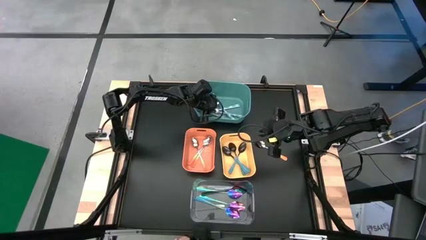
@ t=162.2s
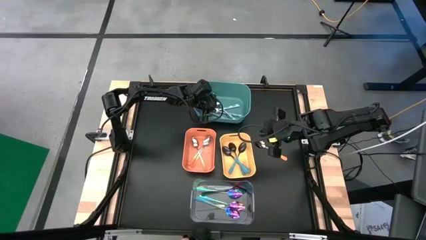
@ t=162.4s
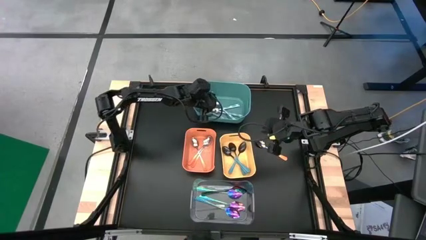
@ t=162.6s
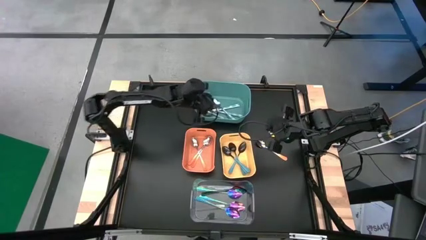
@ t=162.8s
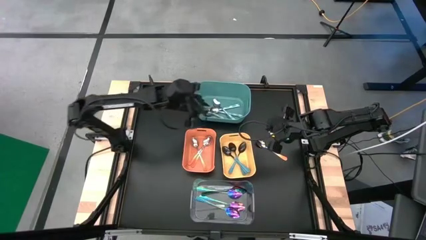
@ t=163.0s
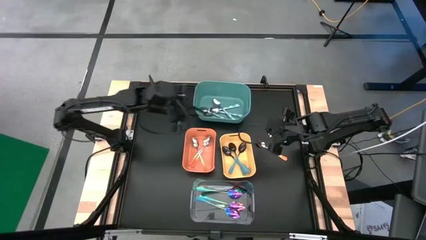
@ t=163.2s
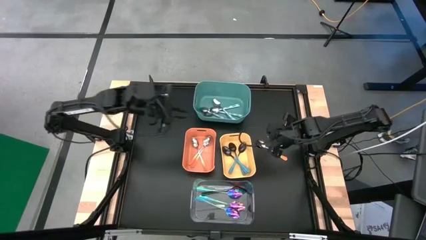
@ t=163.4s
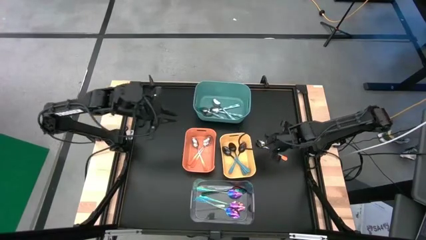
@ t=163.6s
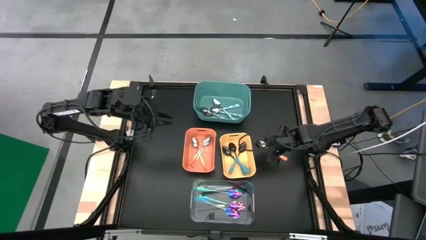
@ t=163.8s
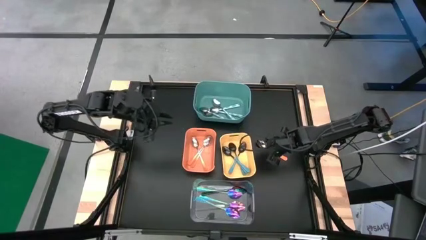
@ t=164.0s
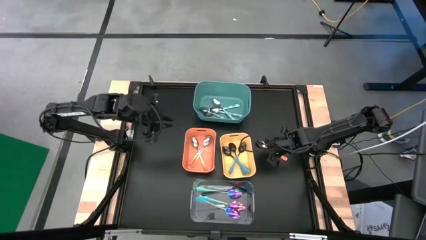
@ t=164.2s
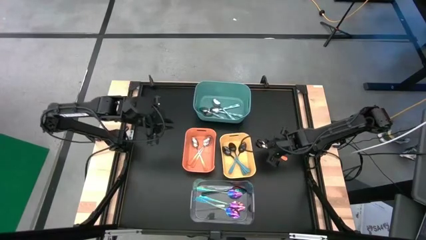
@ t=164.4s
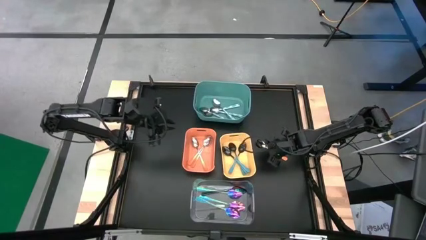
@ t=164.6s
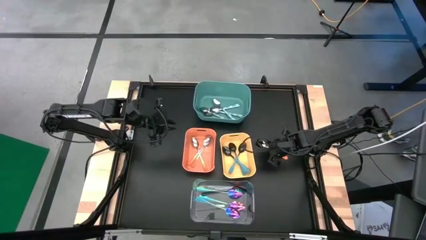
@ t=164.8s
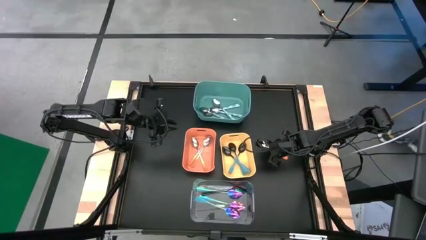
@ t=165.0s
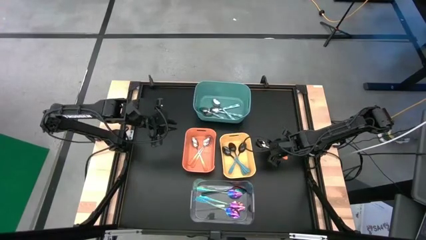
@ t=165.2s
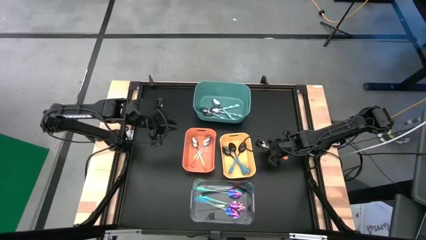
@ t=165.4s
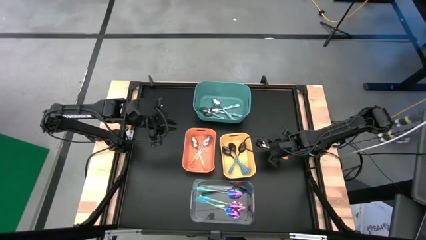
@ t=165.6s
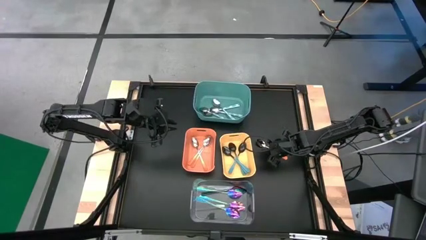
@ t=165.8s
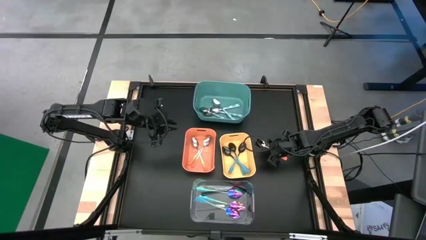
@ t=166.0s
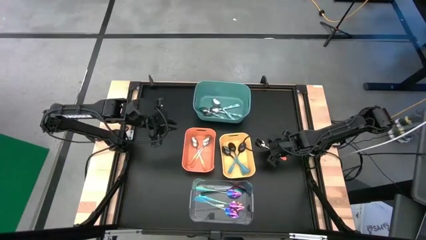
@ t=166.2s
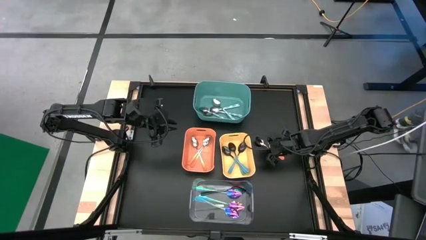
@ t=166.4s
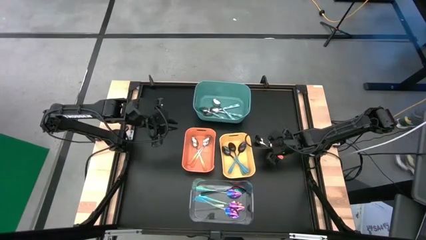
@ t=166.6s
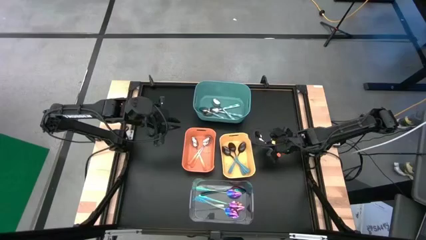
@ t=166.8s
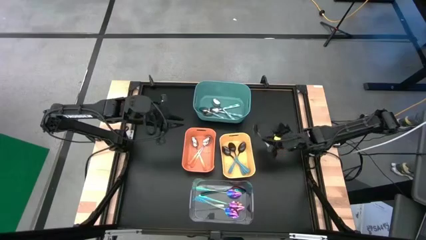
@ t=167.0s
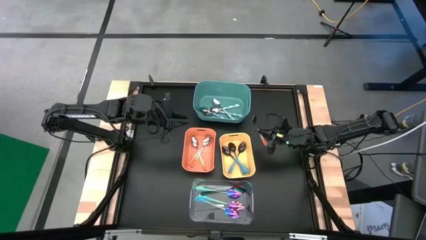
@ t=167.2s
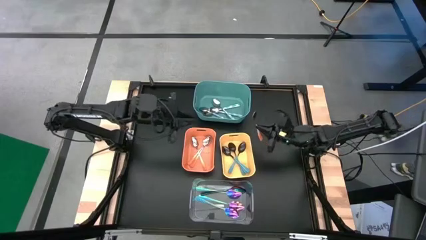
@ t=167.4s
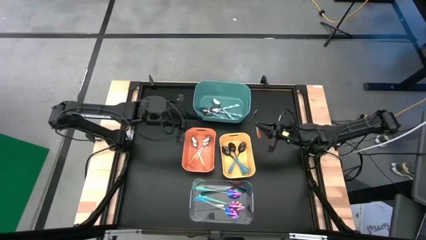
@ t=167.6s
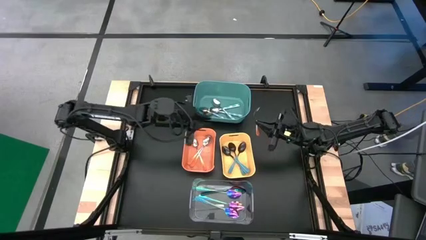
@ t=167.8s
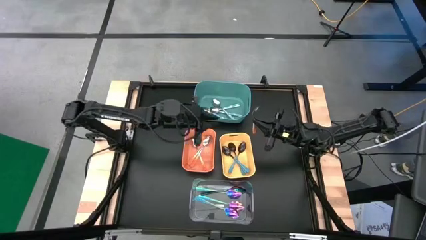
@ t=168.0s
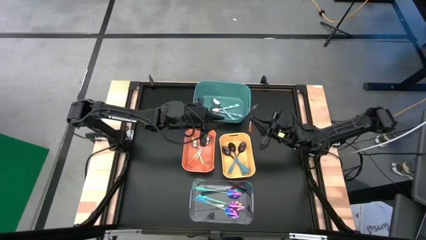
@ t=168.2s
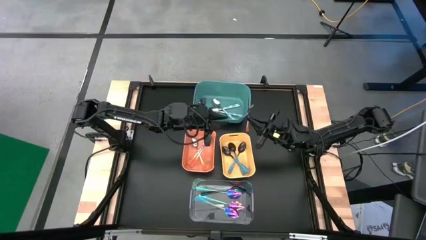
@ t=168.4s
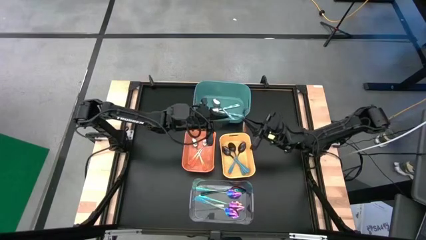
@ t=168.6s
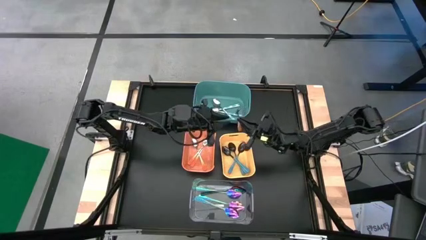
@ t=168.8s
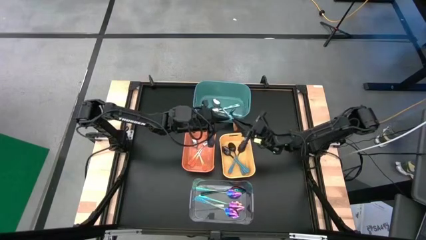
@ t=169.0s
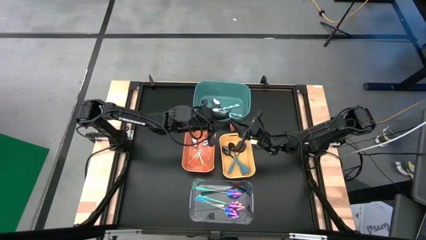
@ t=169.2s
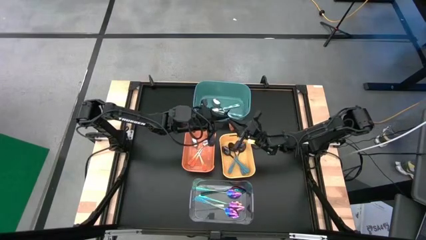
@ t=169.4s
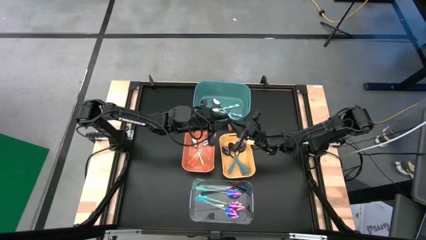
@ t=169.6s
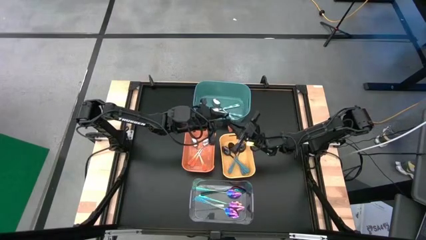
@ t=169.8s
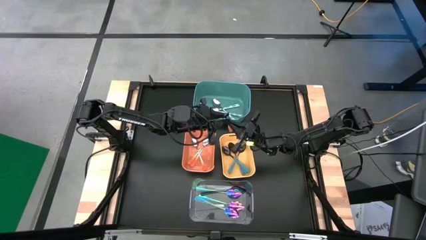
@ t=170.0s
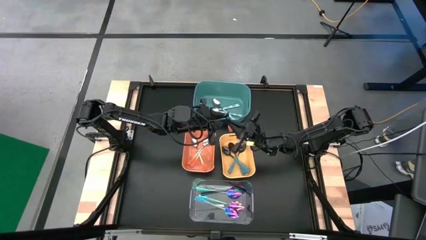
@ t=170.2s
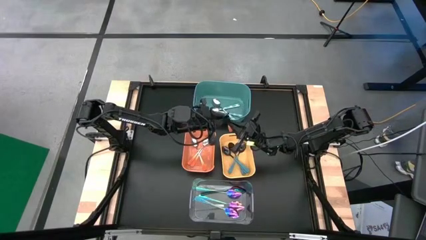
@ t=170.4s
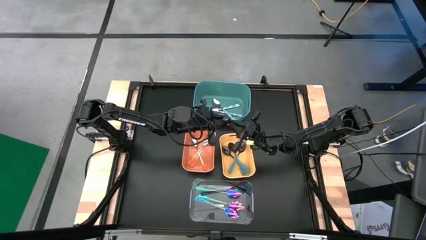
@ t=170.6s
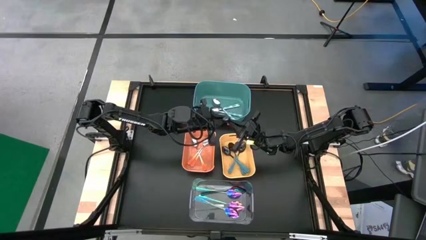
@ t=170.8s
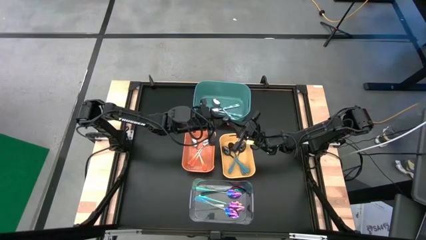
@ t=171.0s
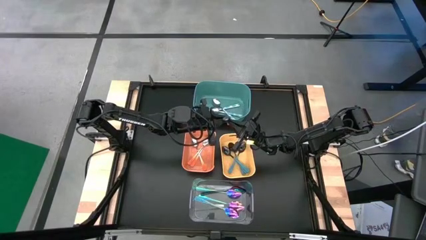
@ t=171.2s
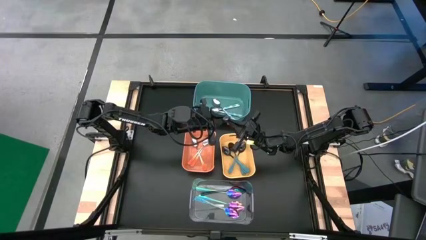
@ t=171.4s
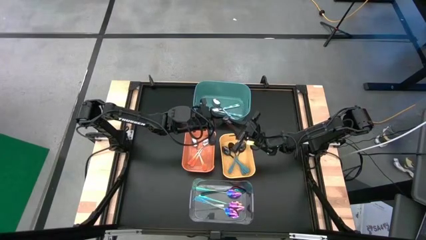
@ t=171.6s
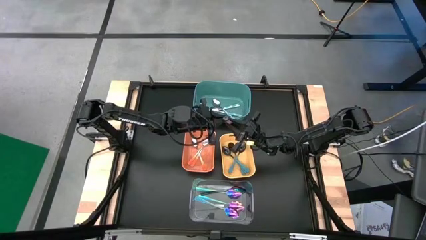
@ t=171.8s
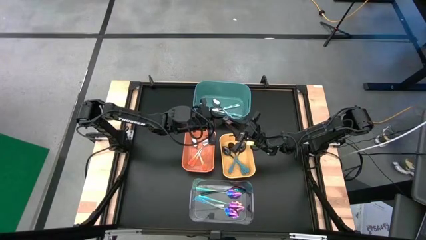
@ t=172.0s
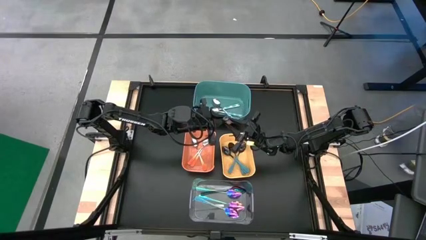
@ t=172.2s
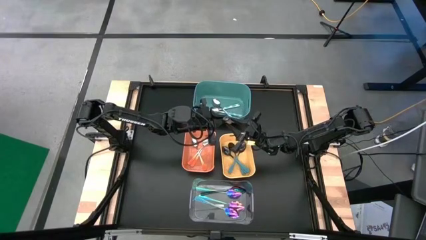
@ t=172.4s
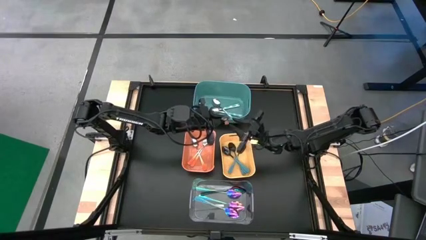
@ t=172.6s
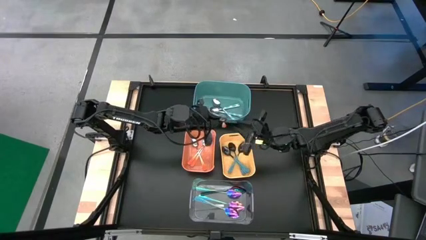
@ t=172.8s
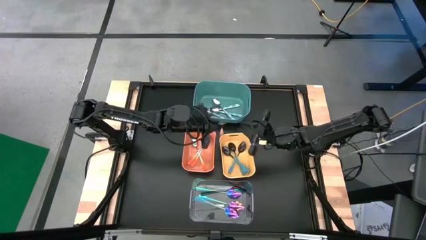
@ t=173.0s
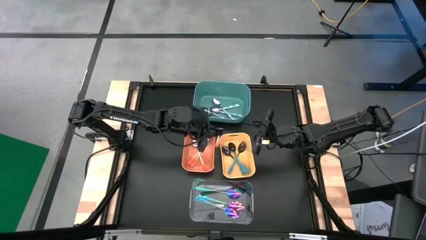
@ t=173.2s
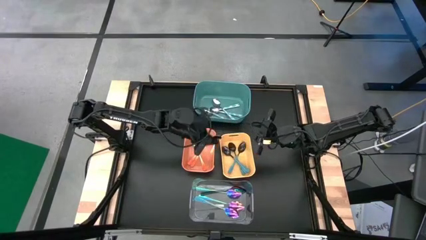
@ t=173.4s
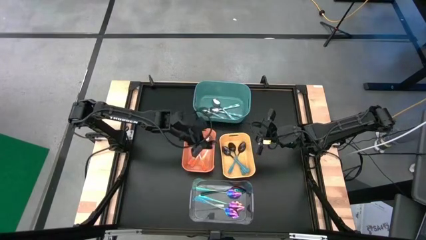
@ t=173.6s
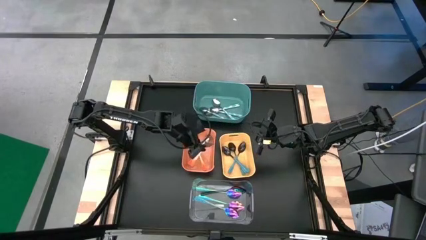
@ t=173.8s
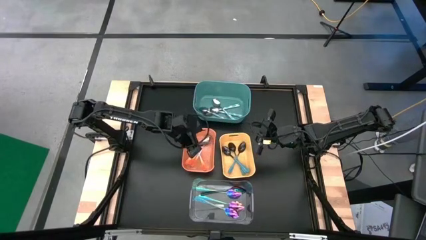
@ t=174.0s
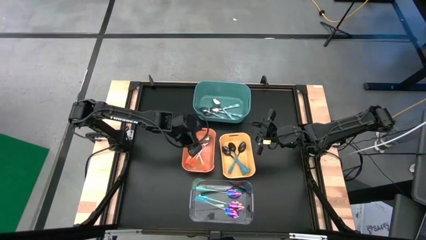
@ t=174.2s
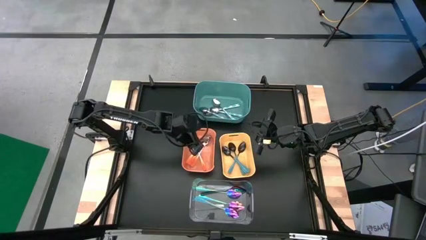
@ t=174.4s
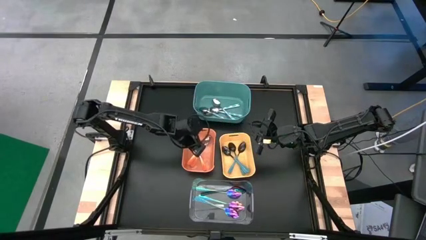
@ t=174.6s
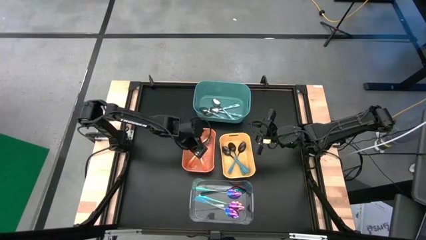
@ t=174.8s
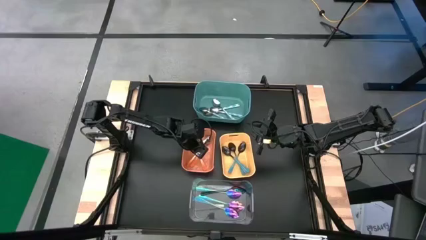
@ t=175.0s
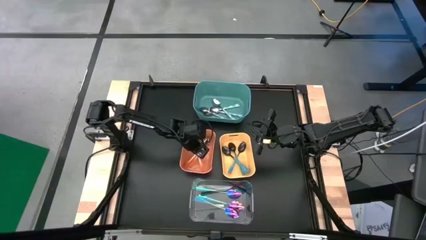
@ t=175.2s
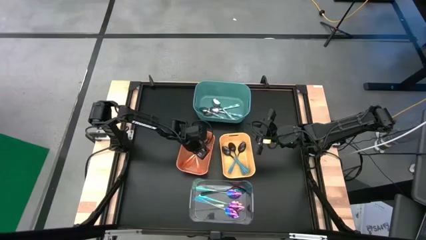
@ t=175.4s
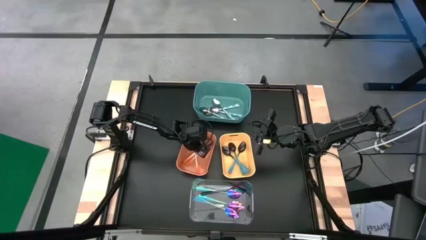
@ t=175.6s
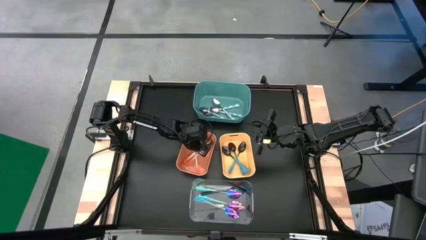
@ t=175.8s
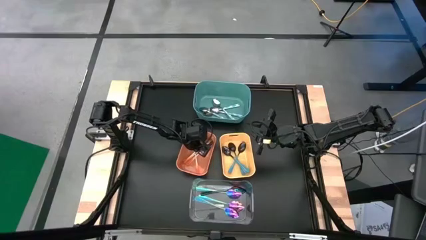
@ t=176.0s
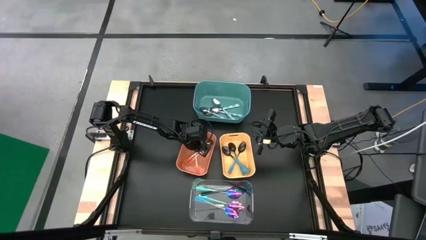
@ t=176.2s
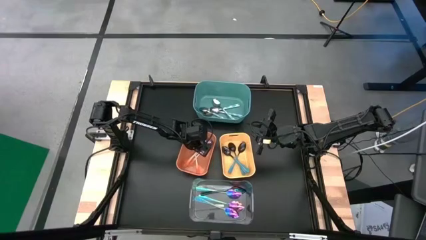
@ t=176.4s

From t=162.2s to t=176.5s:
Task: Sort silverware by color (type)
Put the orange spoon into the orange bin
